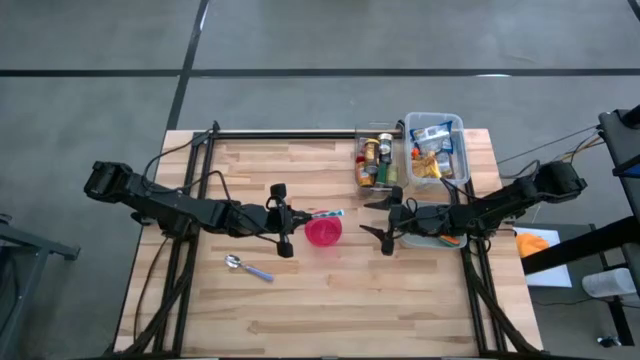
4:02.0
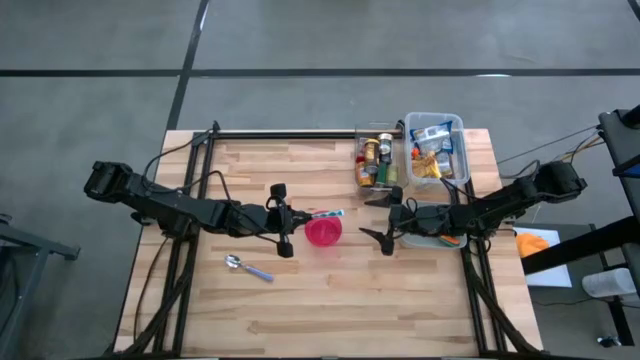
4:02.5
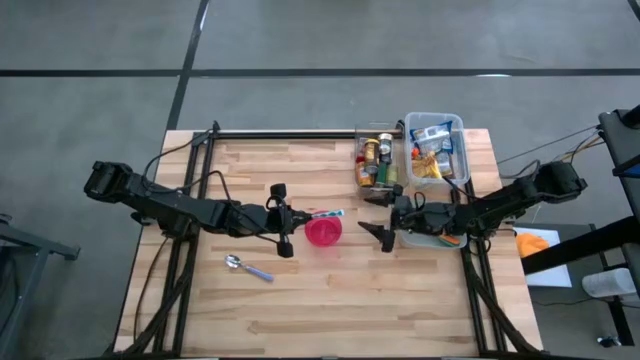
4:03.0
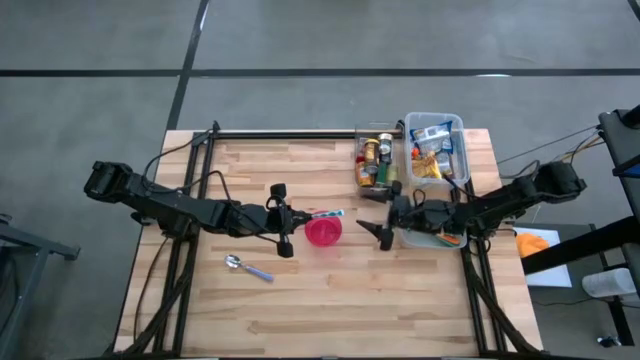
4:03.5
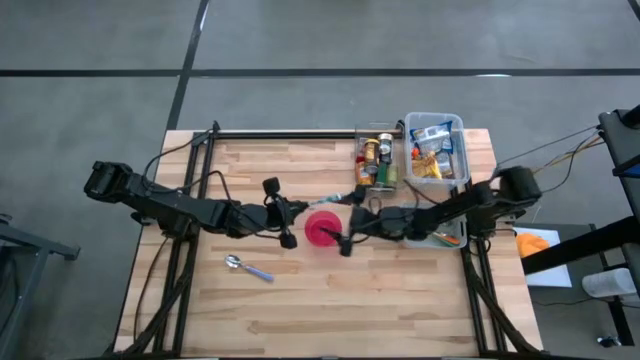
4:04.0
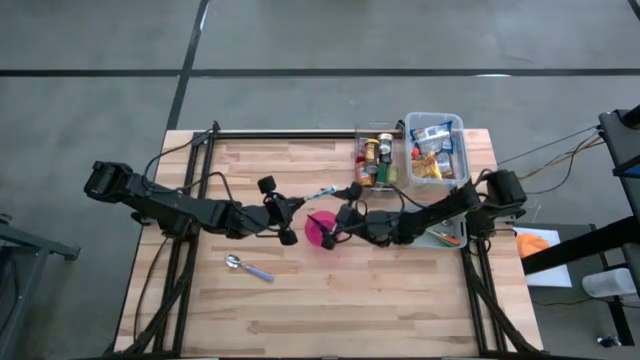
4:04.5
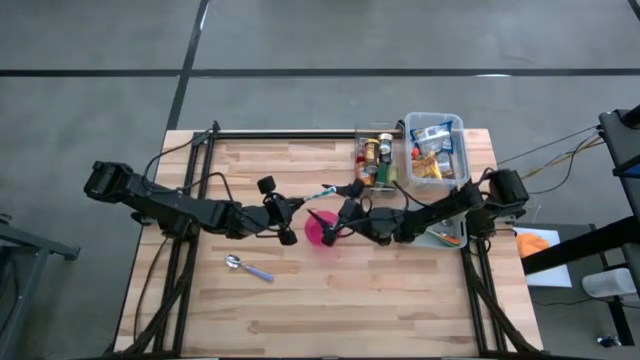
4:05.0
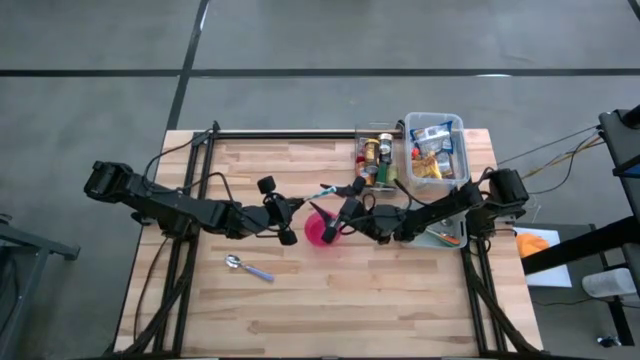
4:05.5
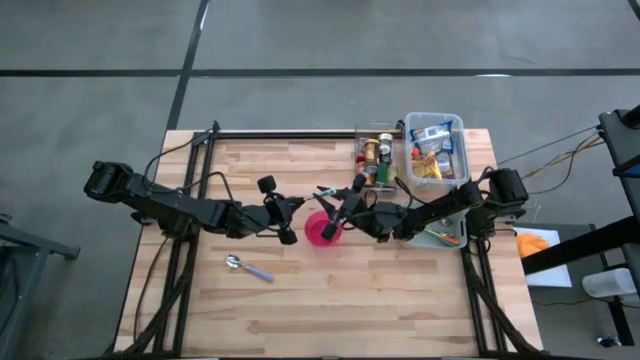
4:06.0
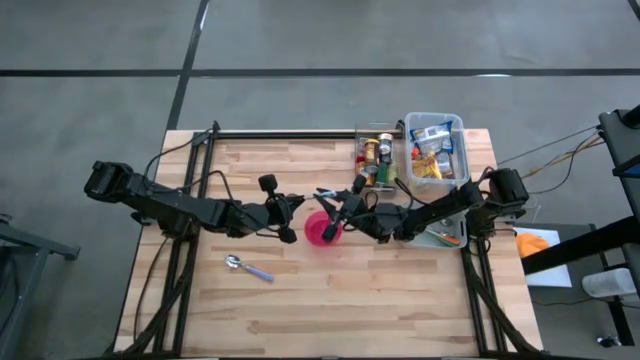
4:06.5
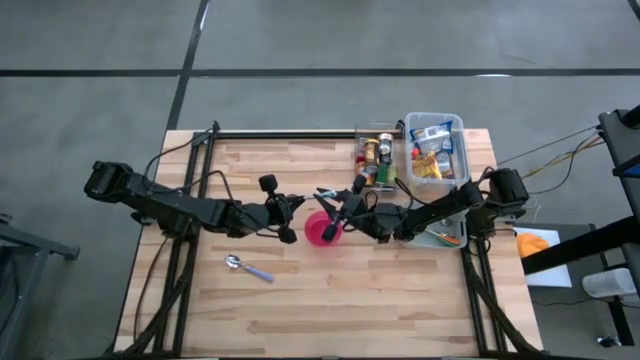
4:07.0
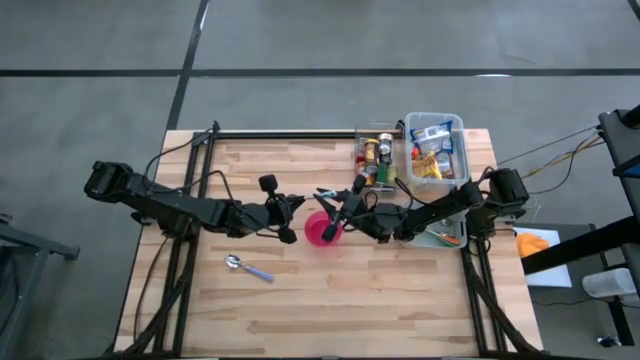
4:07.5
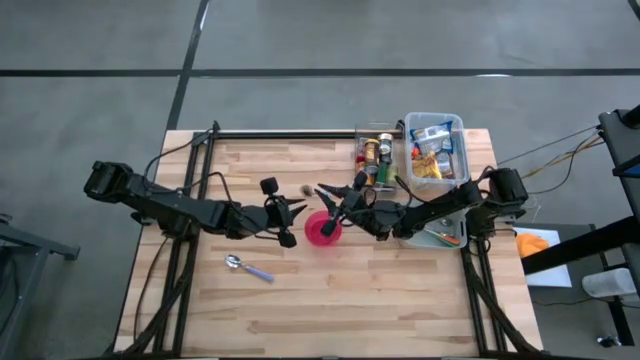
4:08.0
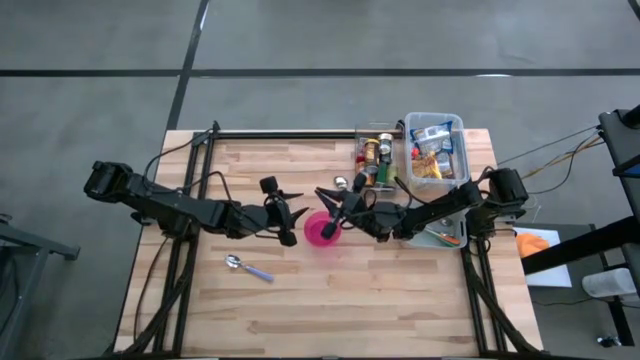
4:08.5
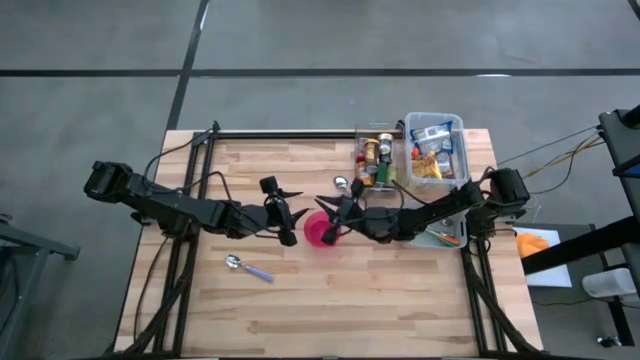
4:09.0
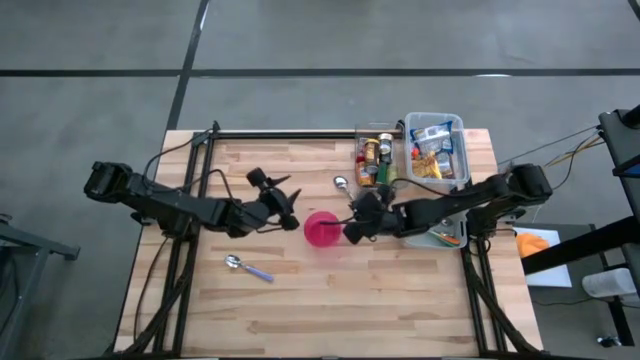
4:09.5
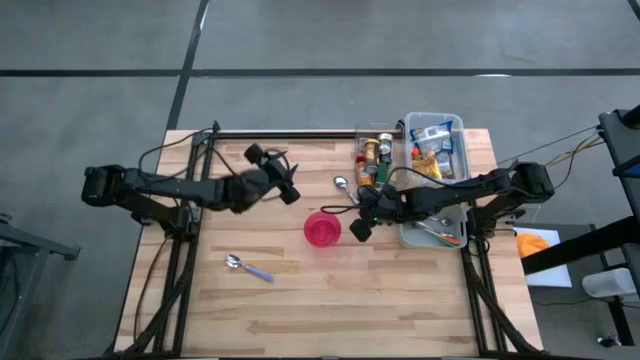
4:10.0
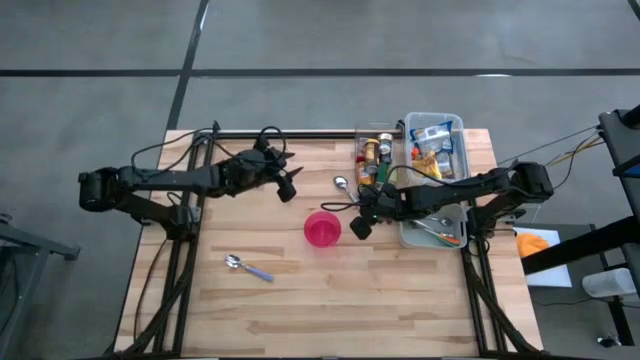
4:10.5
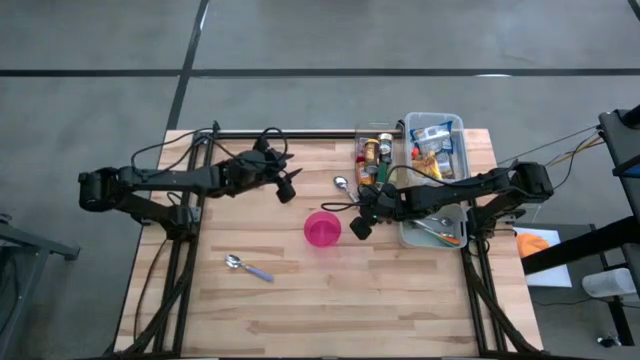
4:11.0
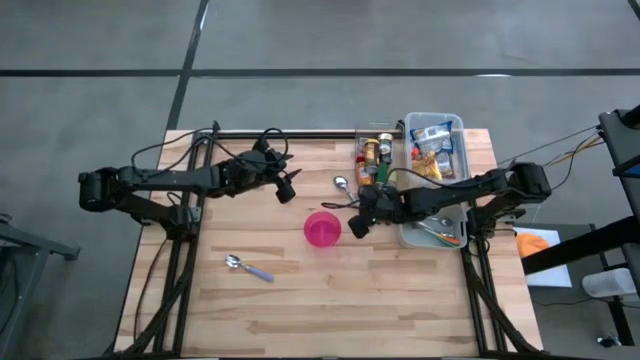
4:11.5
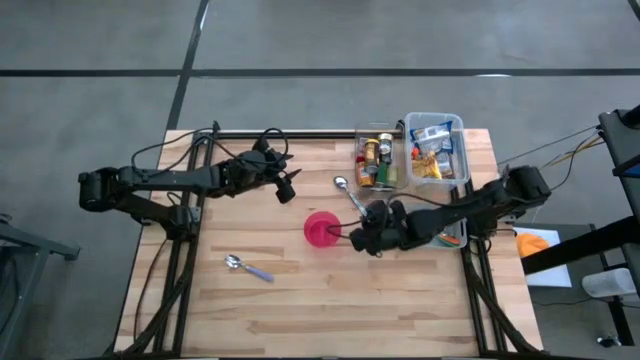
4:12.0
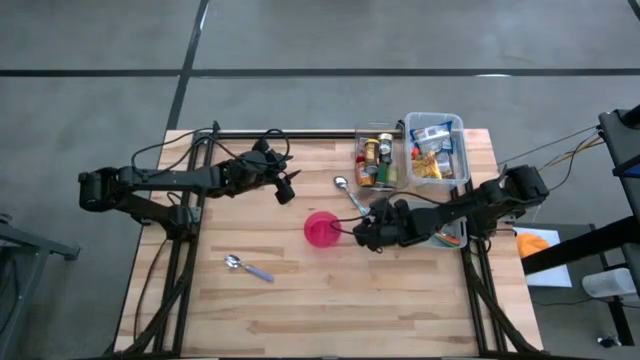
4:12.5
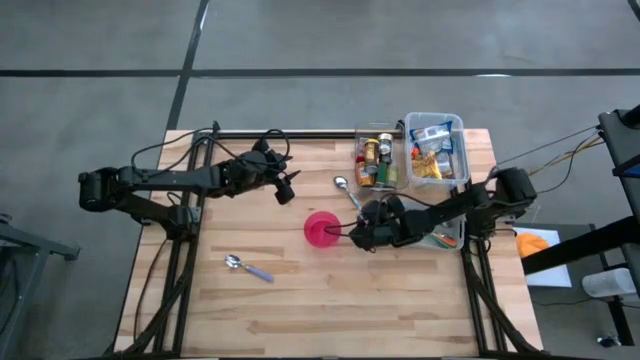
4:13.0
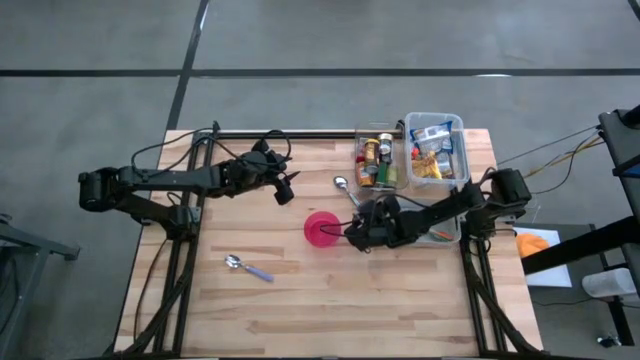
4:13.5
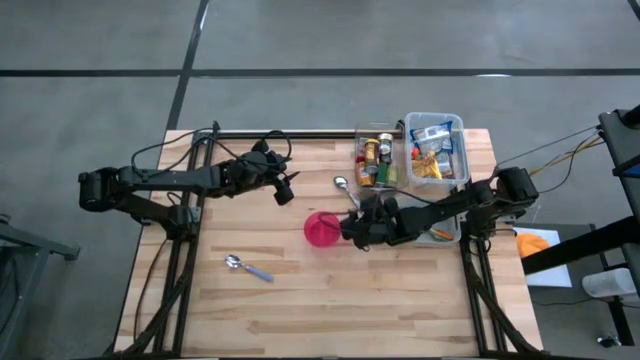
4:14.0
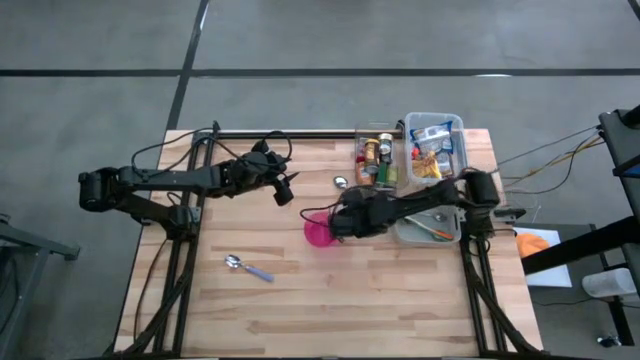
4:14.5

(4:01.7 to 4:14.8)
Put the blue patterned spoon into the gray bin

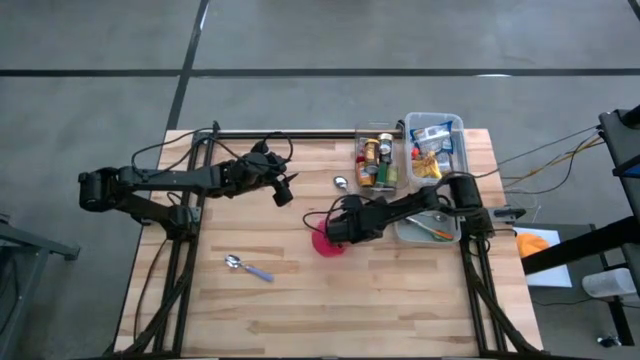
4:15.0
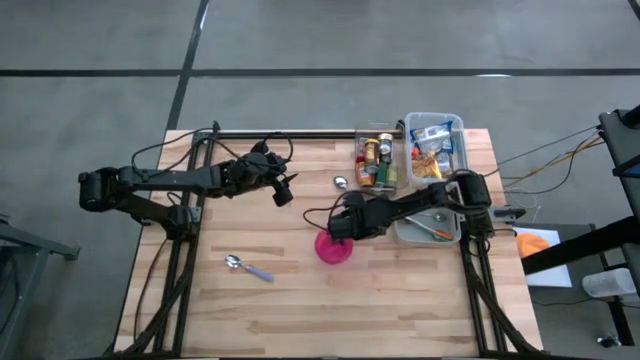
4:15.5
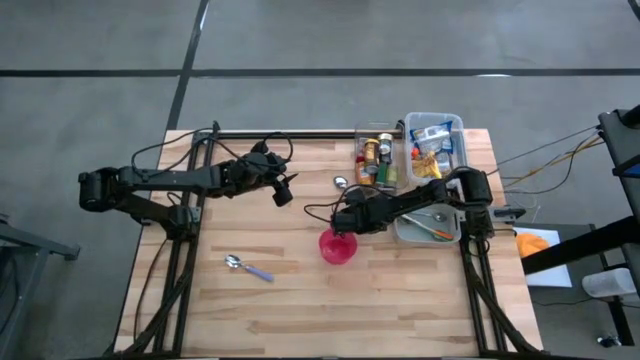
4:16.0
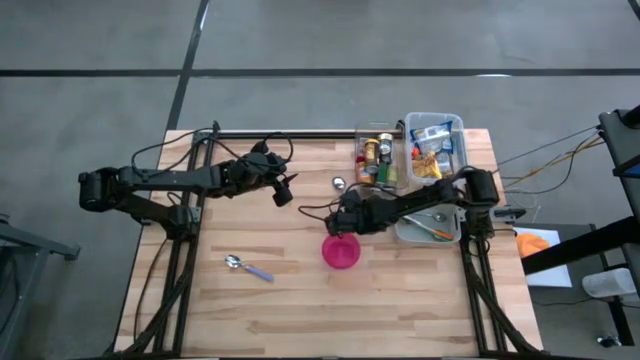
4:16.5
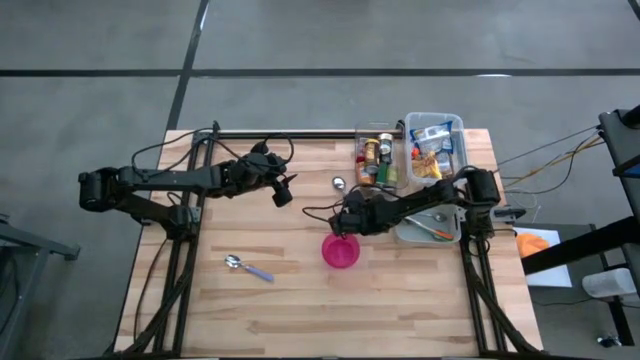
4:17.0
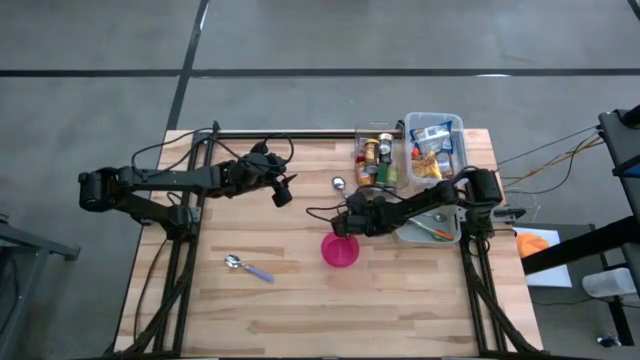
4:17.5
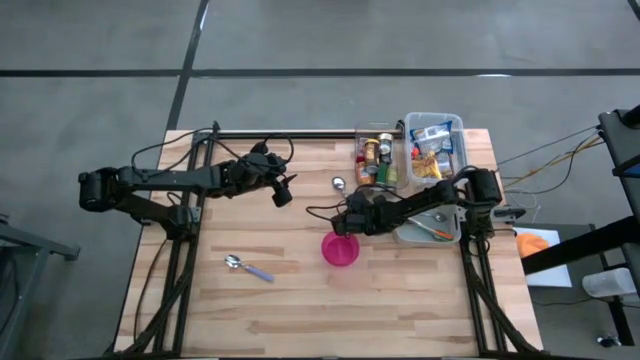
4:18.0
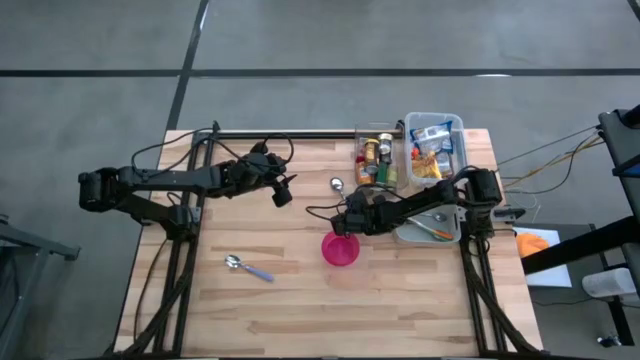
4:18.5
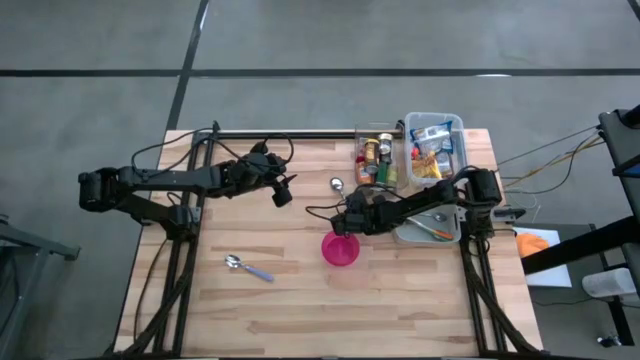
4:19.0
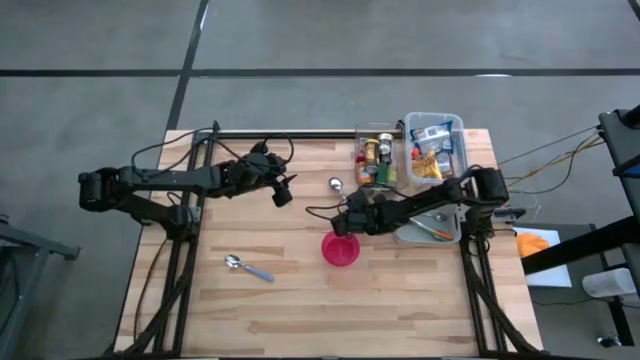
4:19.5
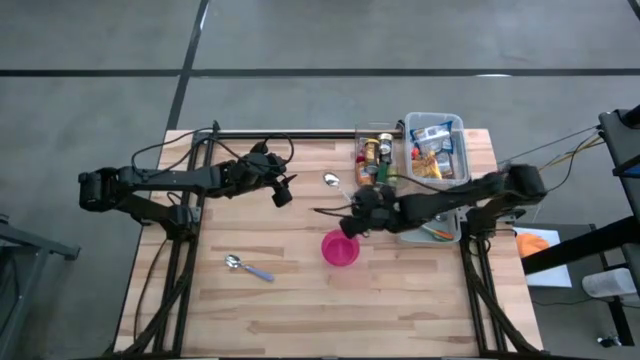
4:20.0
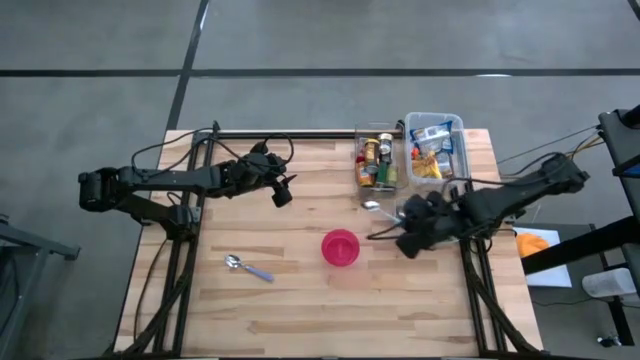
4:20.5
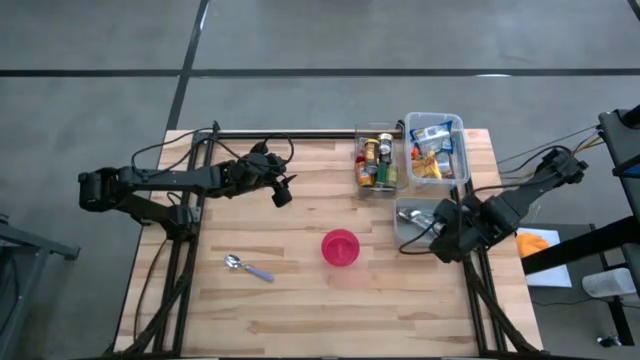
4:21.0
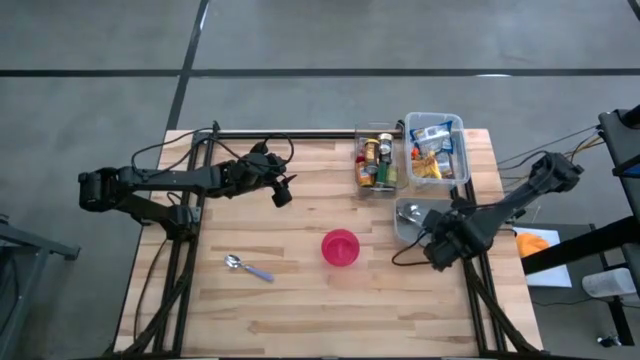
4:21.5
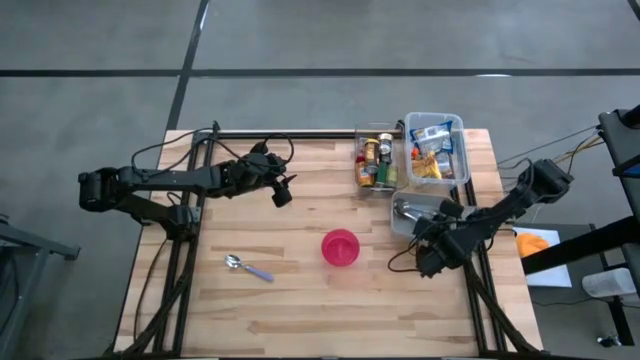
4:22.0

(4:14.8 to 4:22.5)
Put the blue patterned spoon into the gray bin
